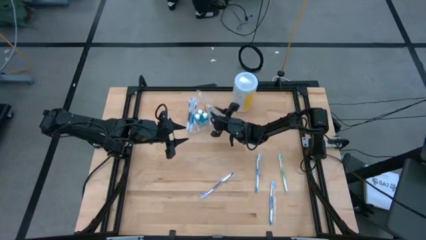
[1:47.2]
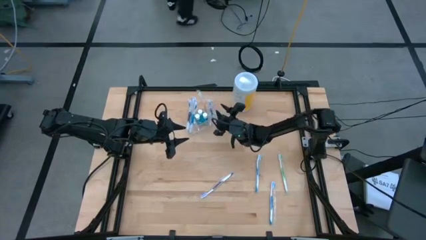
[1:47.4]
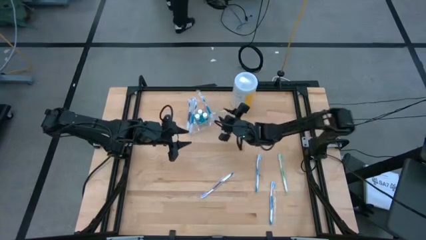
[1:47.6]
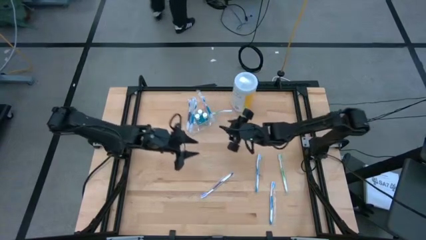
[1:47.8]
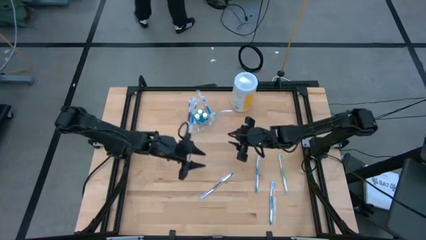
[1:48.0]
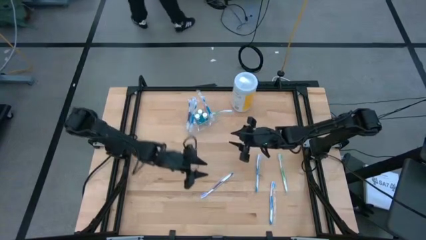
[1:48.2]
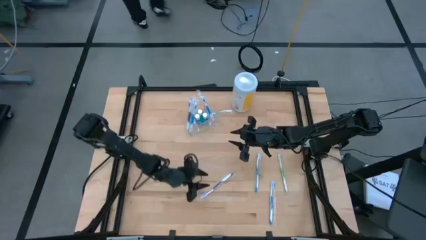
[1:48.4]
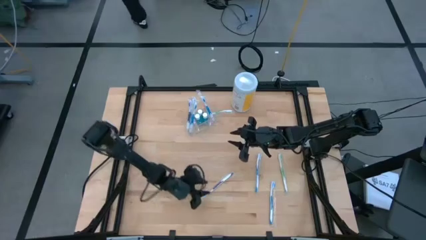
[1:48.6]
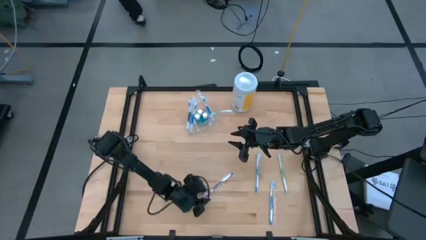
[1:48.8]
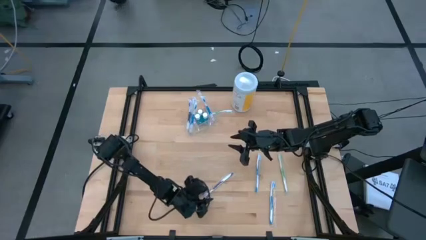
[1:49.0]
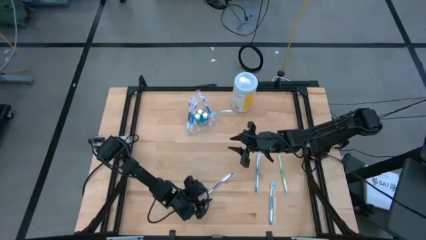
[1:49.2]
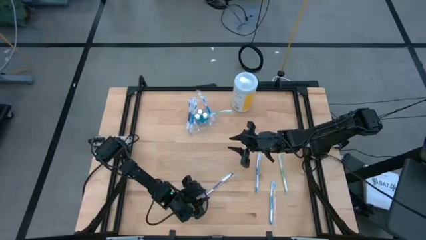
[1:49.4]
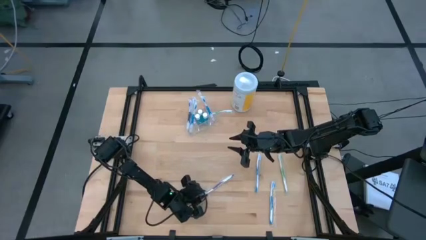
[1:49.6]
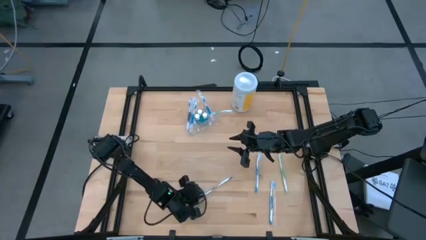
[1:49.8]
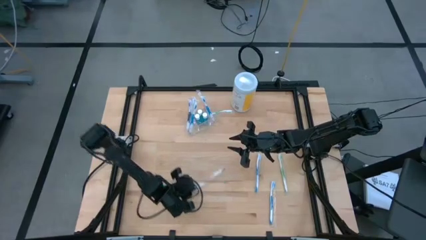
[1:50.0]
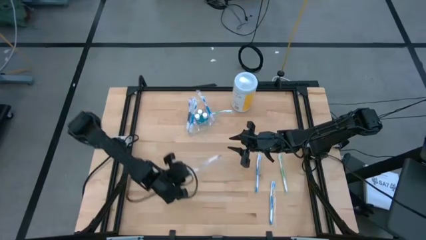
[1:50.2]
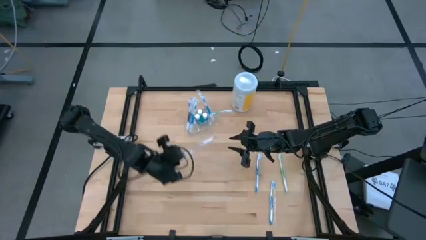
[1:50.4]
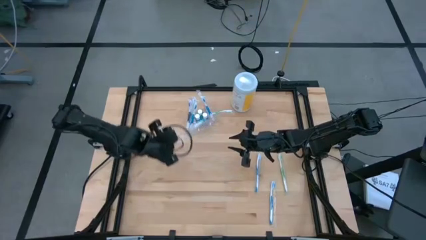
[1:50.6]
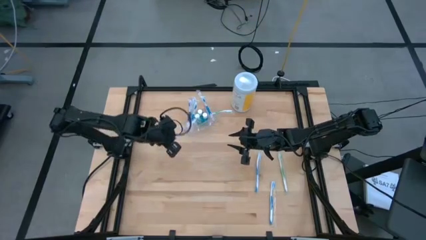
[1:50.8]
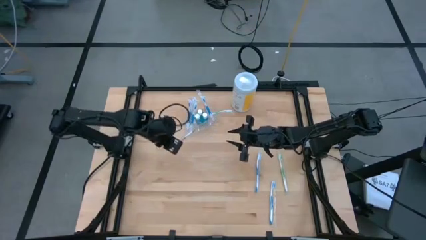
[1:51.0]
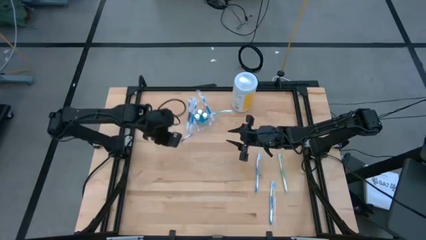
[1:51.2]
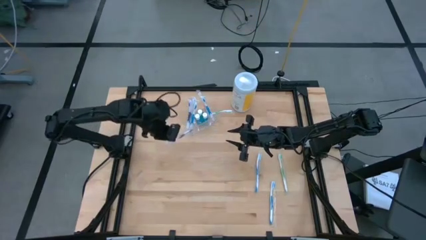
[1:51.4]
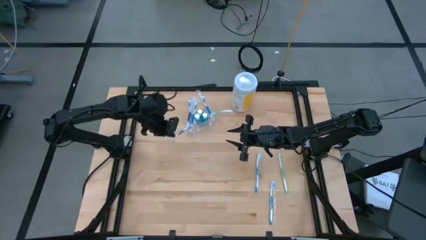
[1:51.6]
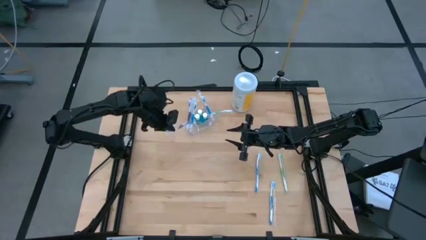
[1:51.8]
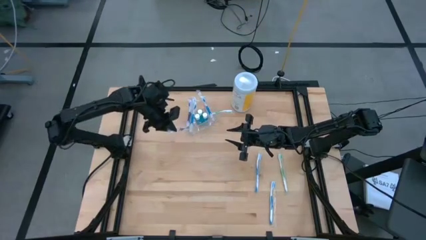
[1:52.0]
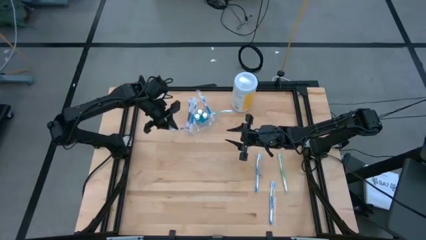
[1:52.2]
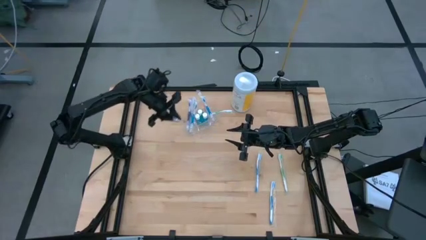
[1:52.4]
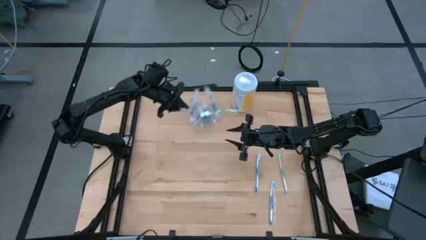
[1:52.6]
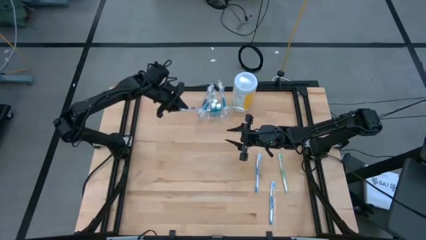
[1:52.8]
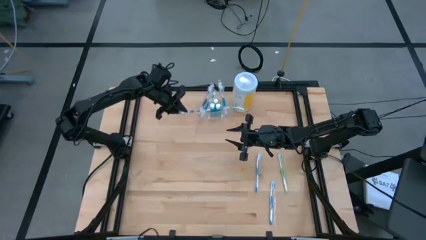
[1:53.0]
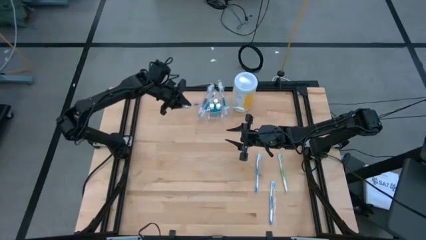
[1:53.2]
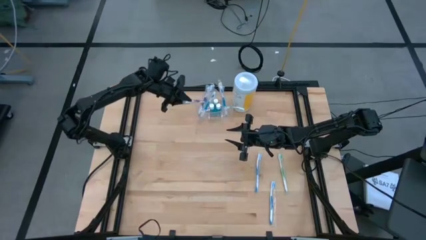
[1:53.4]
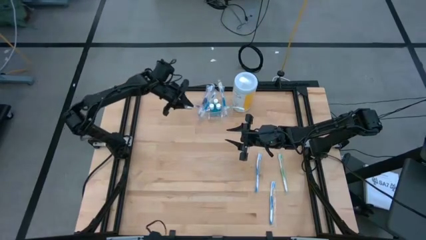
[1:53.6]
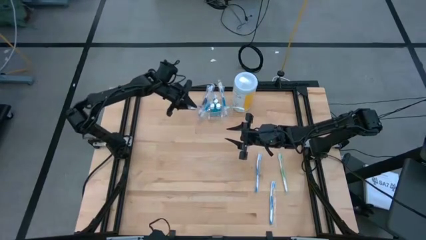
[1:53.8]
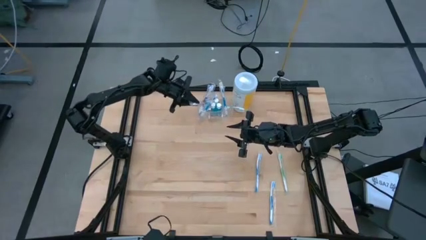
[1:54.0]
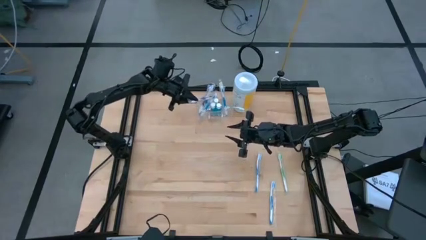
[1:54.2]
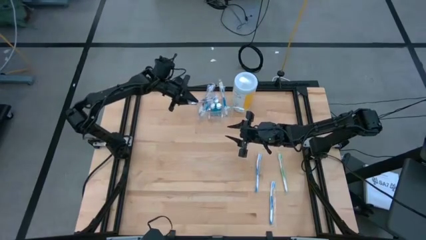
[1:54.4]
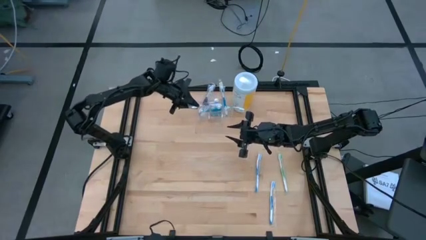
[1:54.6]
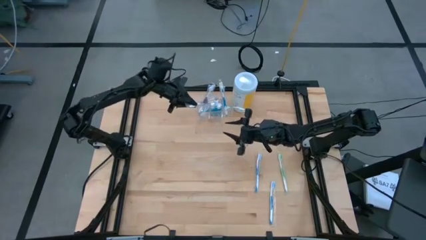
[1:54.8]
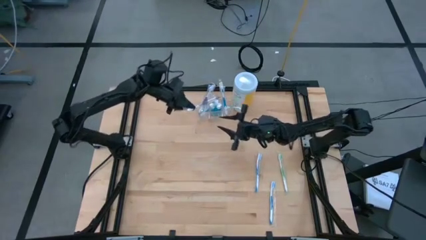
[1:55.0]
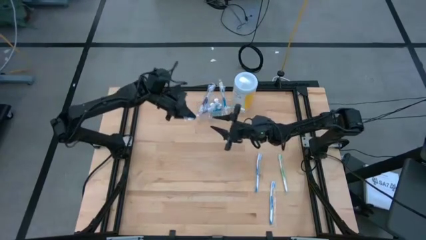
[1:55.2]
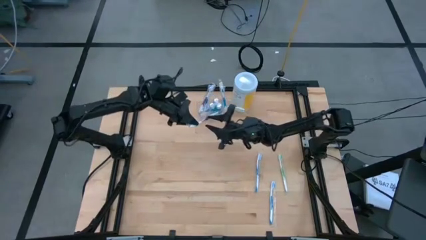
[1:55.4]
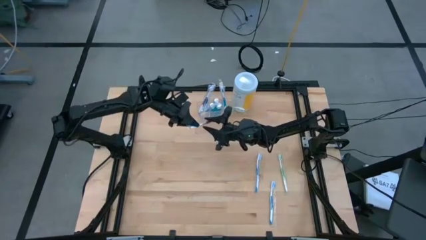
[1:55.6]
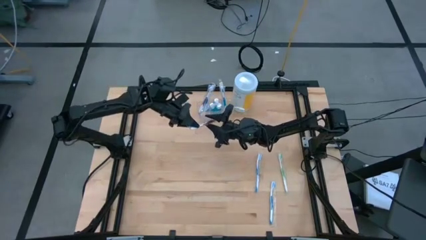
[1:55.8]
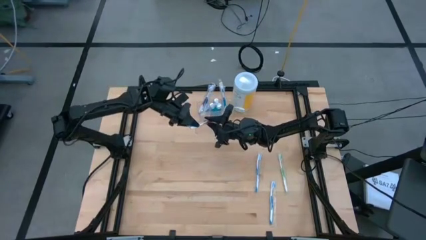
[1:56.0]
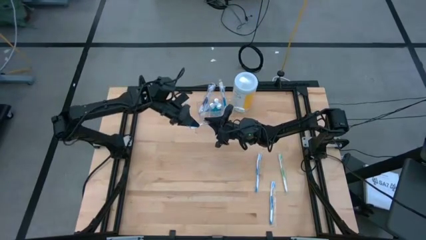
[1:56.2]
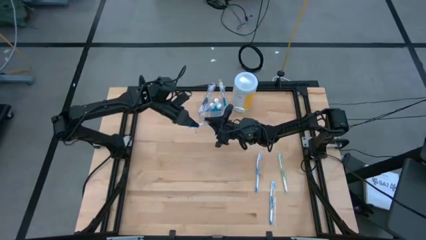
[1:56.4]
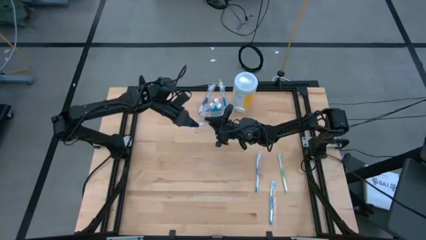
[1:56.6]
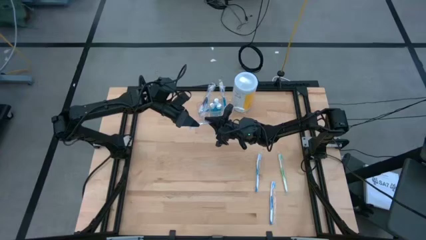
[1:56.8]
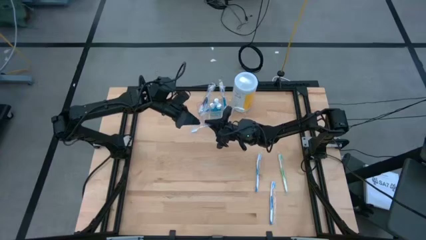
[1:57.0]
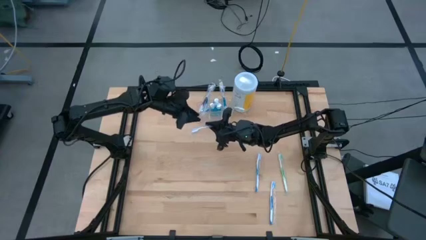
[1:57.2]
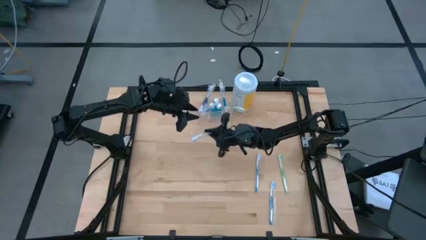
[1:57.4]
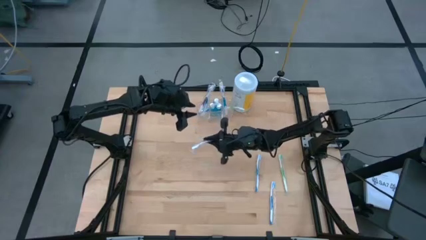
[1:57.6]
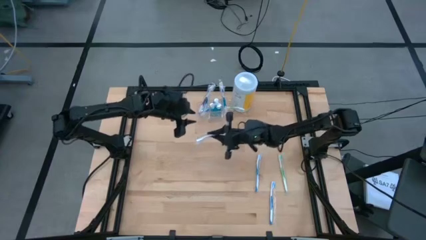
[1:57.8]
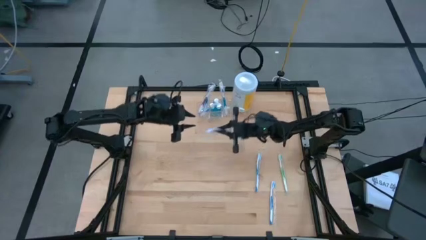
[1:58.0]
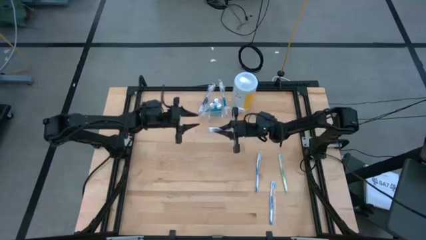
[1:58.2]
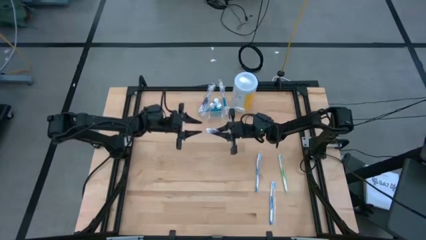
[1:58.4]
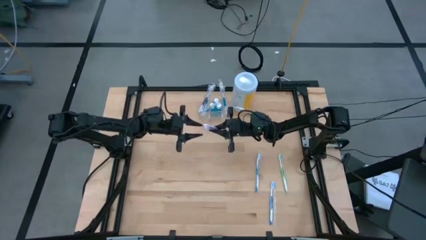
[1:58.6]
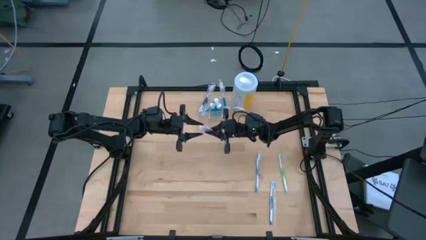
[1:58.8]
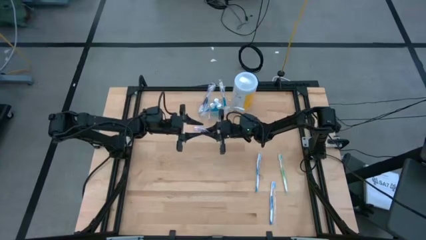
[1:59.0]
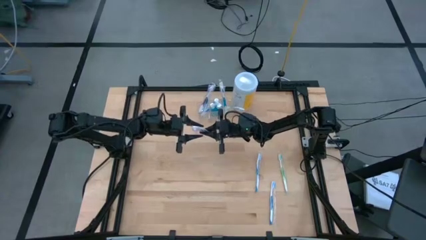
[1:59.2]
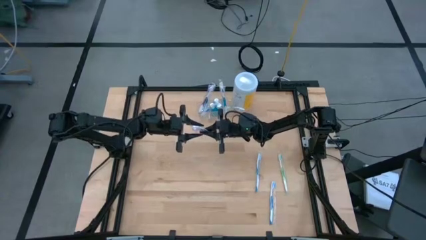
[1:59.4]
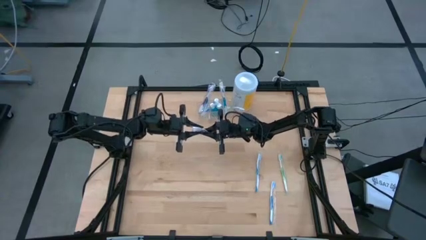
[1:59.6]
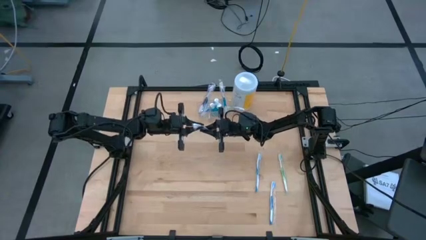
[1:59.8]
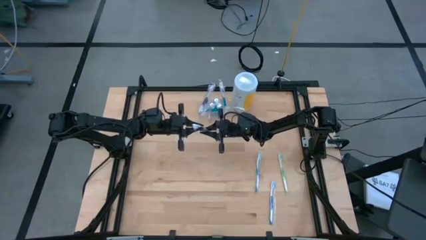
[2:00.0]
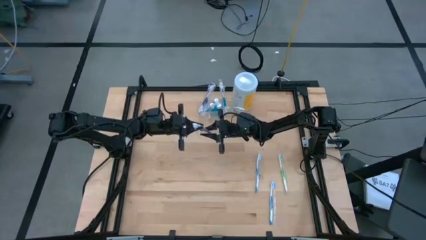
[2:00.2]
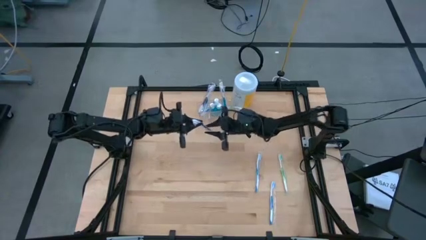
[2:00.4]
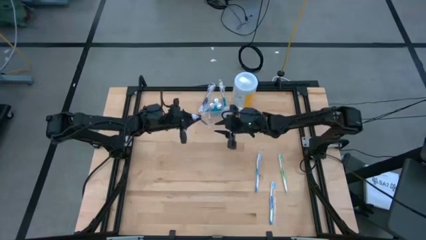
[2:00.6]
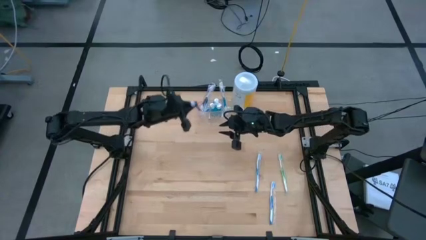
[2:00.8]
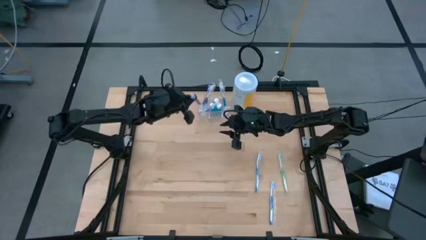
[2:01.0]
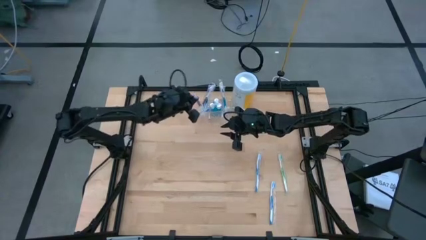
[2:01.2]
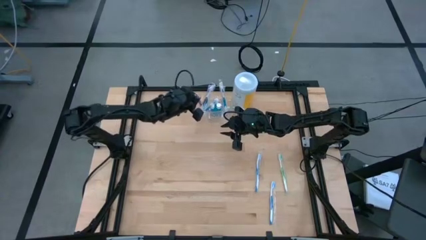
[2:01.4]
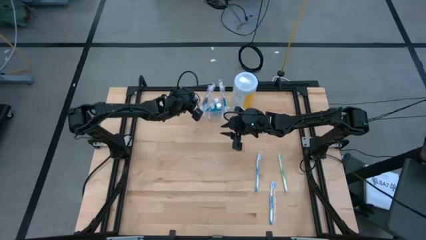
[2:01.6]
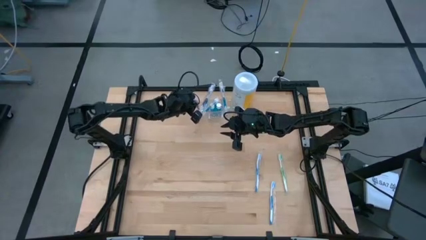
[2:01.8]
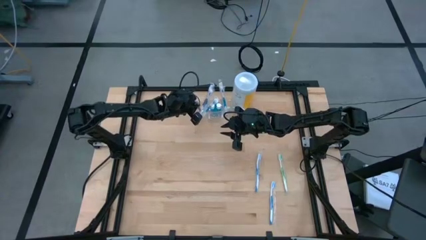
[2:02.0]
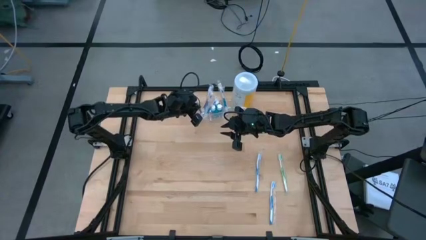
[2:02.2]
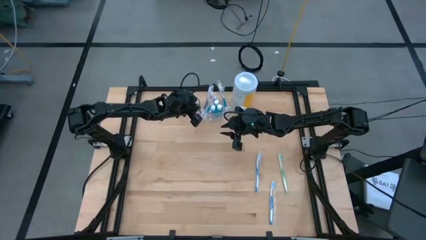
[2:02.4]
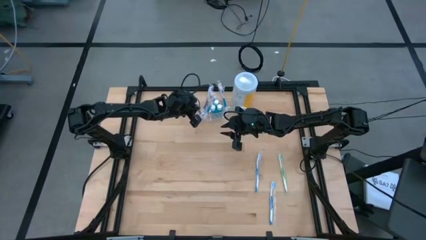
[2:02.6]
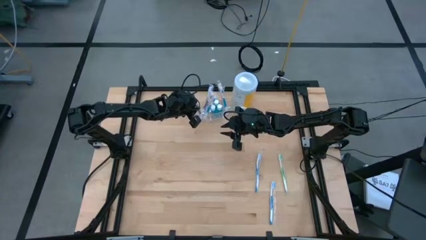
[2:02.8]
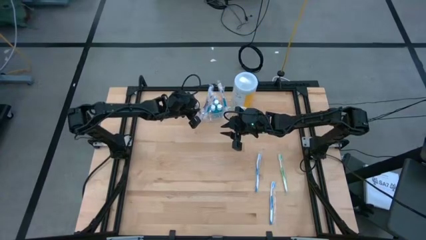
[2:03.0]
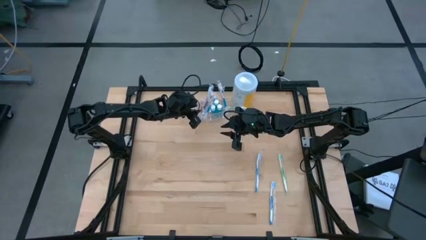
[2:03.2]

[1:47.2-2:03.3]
Task: Pick & Place toothbrushing station
Put the purple toothbrush into the transparent organizer
